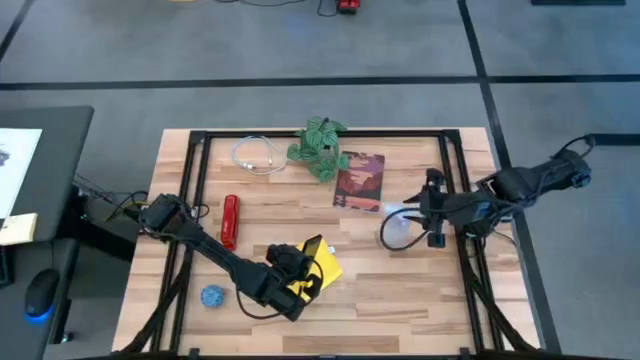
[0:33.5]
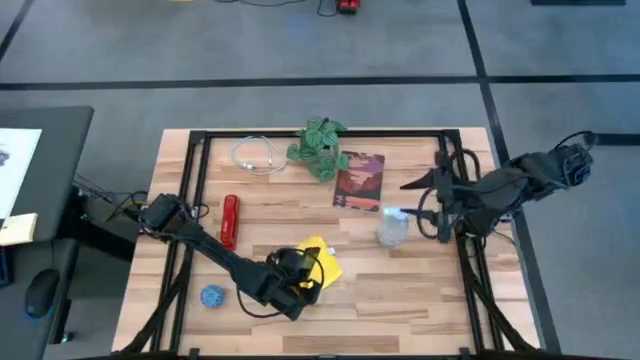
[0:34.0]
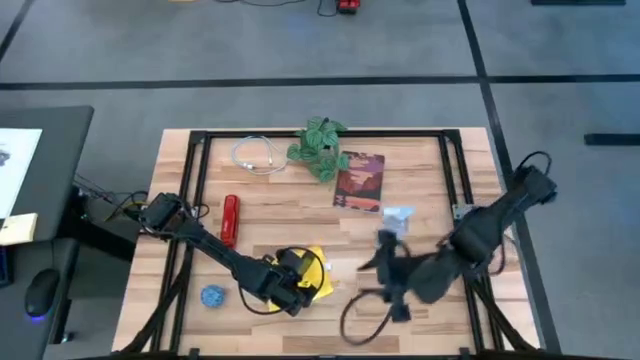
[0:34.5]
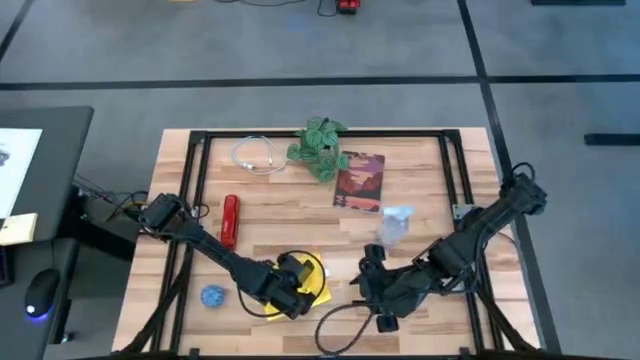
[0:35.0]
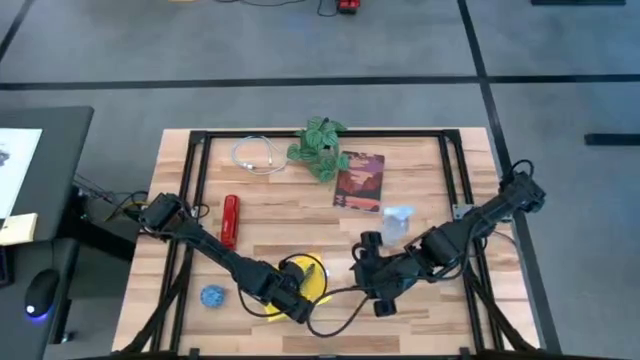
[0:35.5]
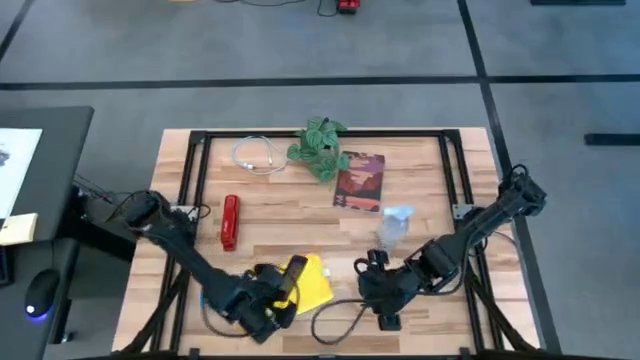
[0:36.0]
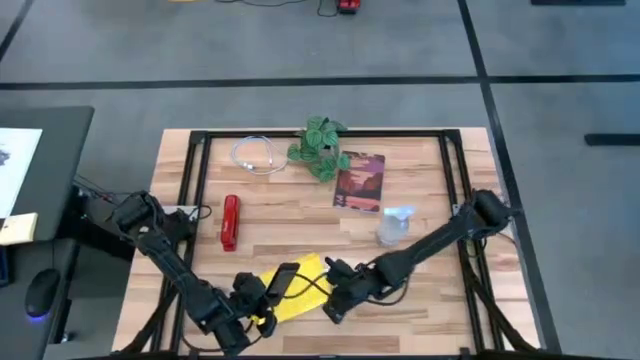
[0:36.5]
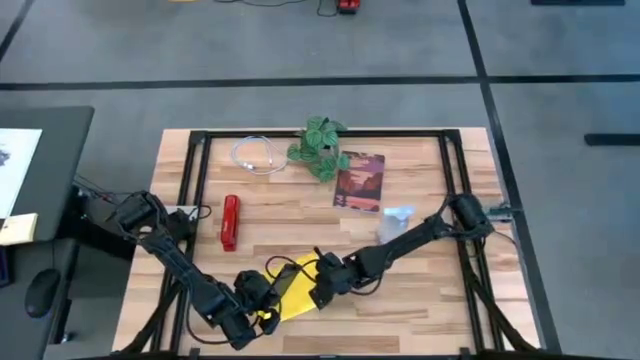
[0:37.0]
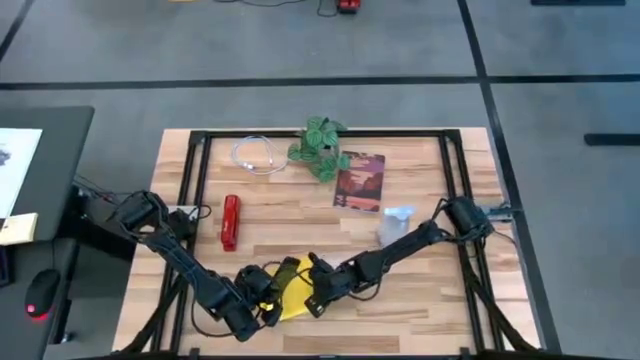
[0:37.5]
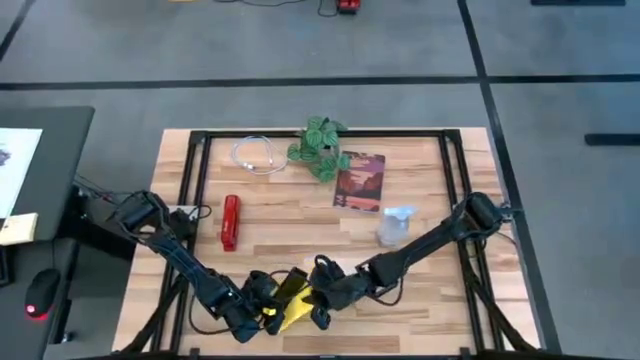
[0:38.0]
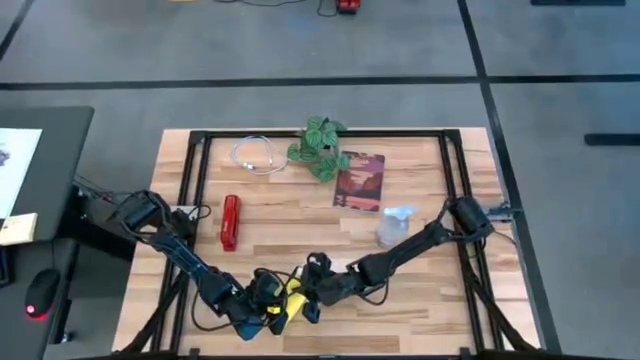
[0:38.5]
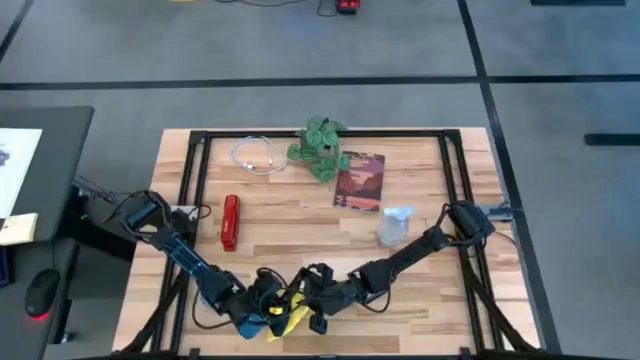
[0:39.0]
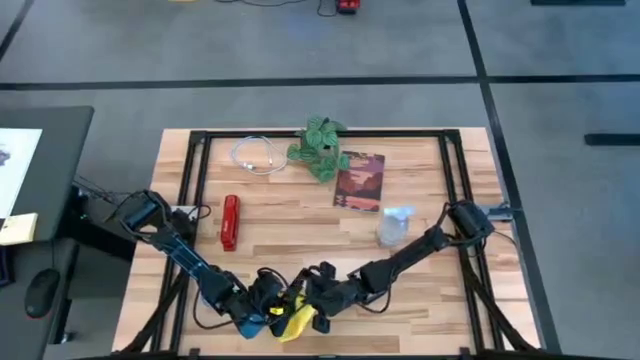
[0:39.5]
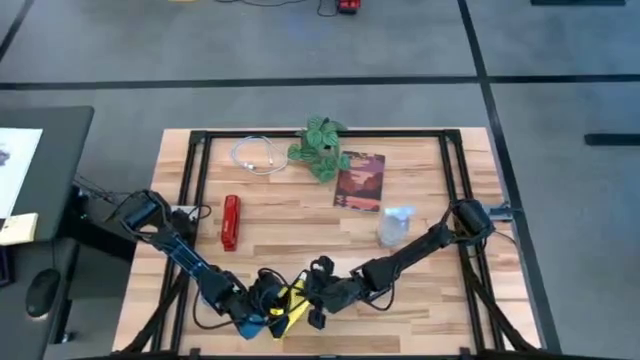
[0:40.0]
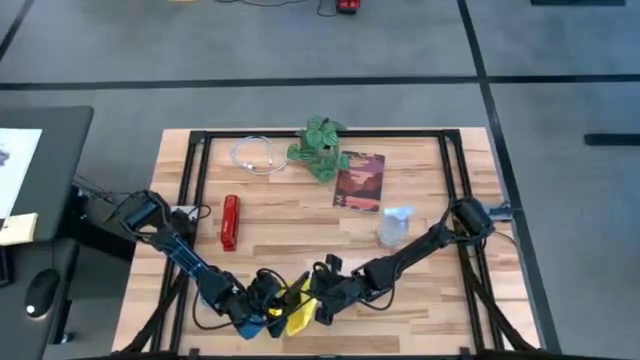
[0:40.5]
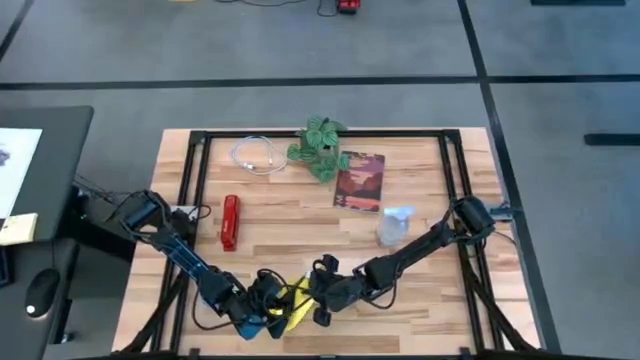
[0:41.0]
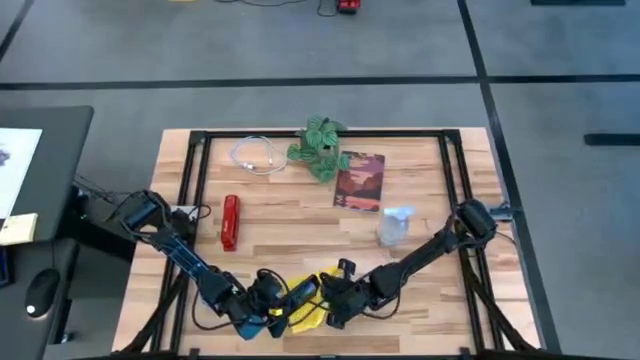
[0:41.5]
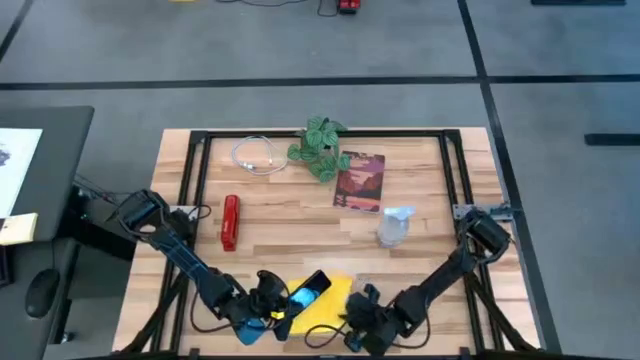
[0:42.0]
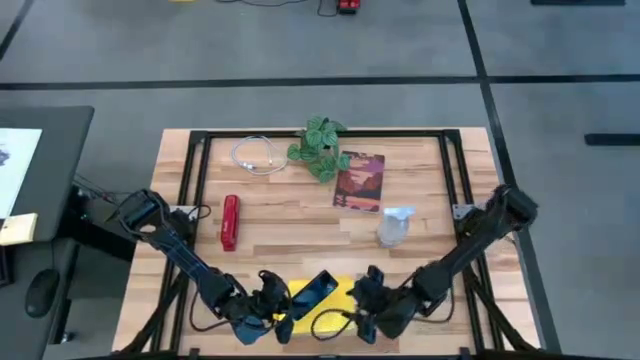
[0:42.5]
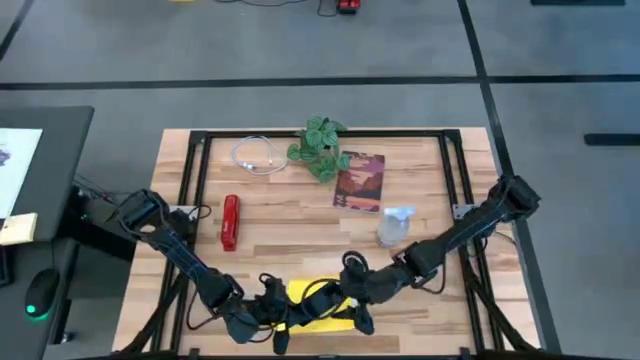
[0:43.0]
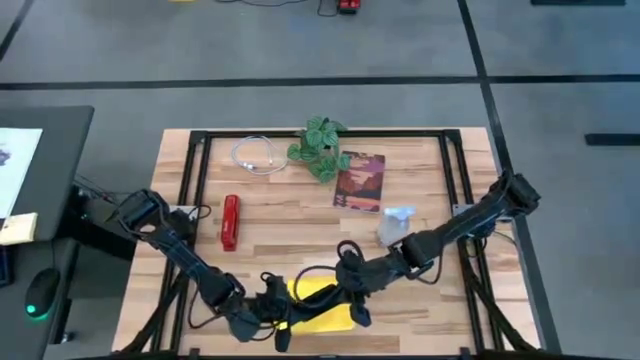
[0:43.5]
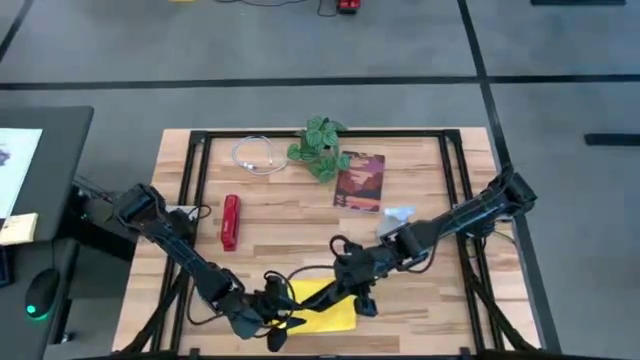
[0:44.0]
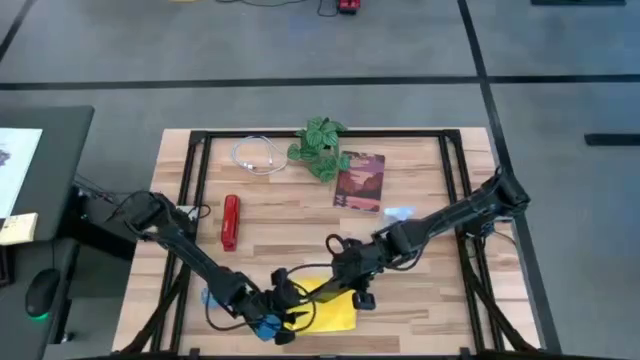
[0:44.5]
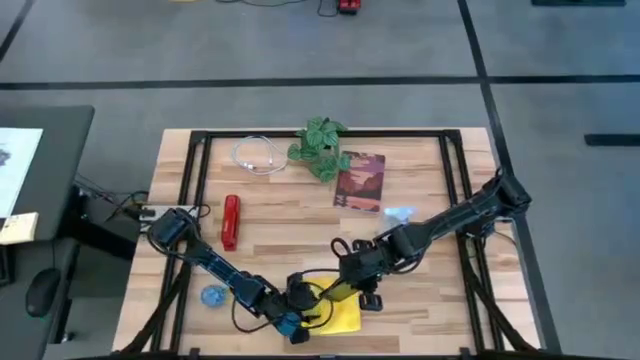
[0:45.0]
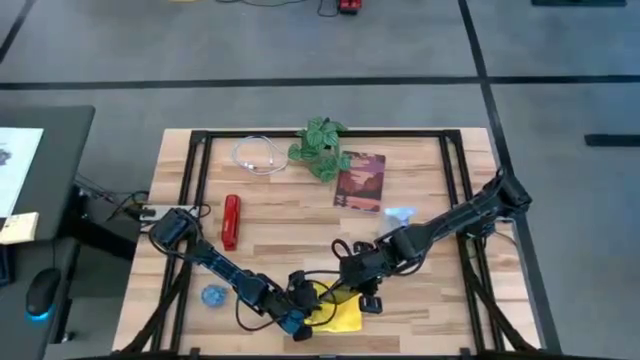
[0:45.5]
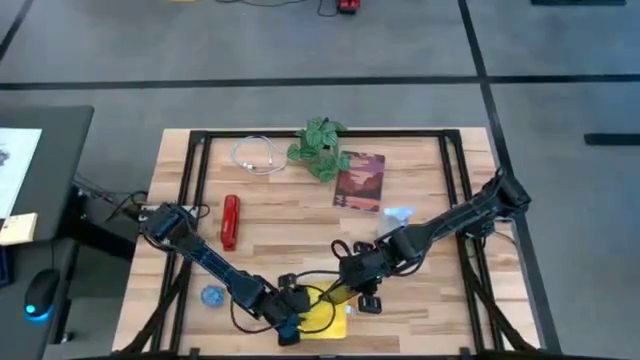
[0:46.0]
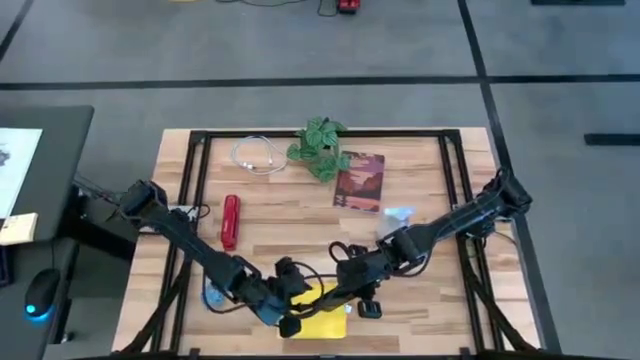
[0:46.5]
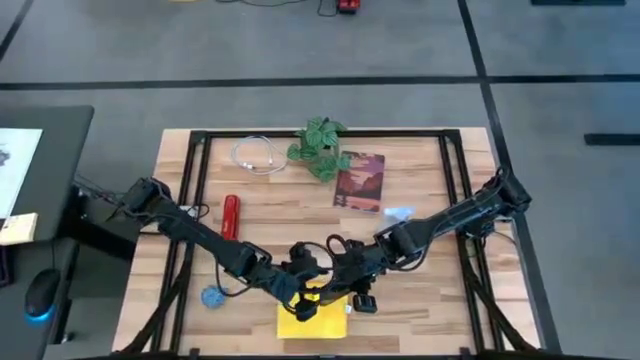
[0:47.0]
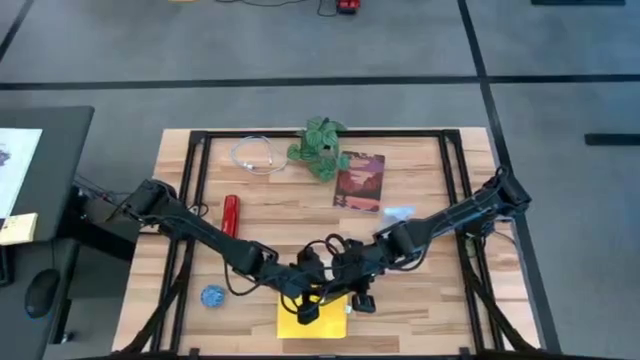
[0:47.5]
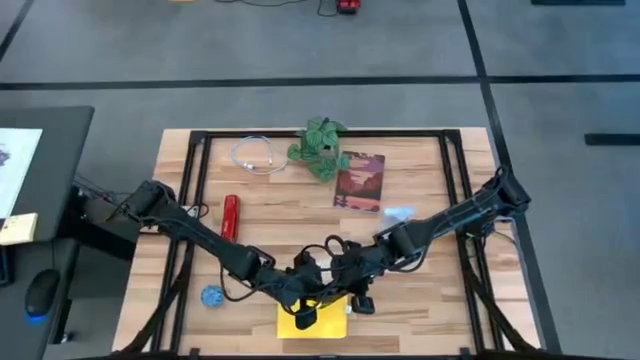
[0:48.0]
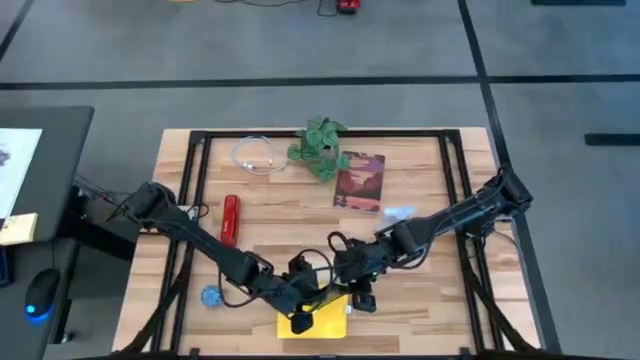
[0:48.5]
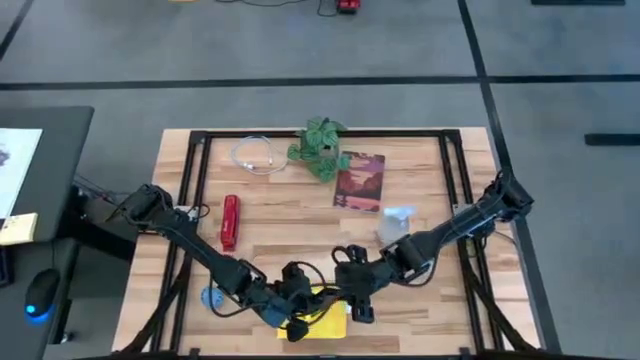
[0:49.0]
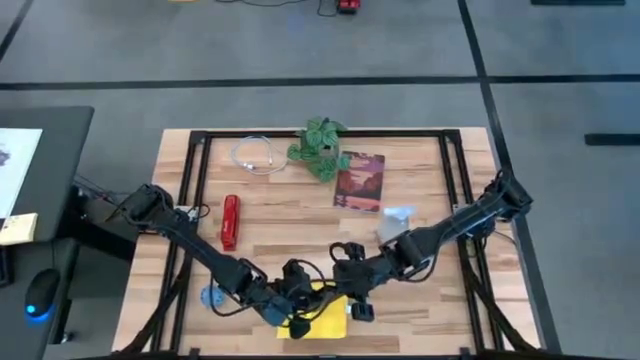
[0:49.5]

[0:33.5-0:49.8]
Task: Apply microfiber cloth
Wipe the front of the cellphone using the microfiber cloth

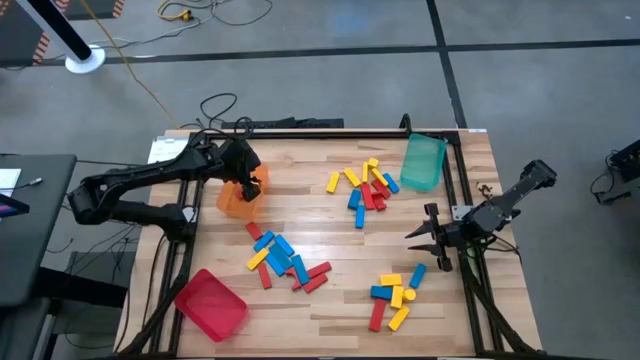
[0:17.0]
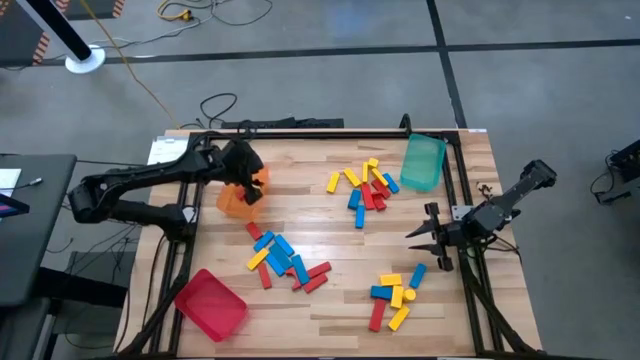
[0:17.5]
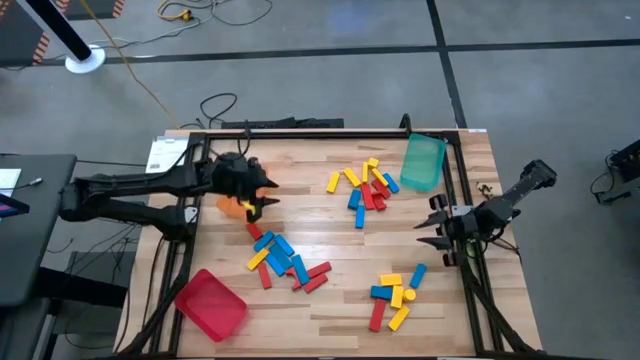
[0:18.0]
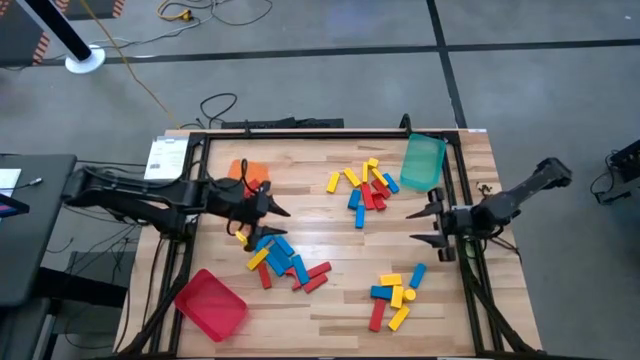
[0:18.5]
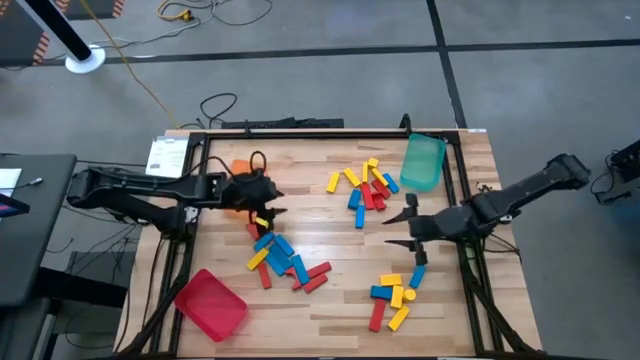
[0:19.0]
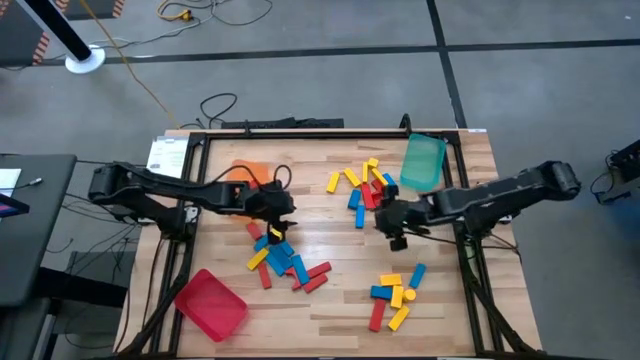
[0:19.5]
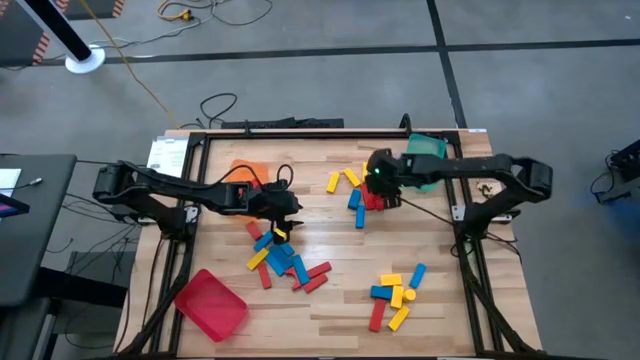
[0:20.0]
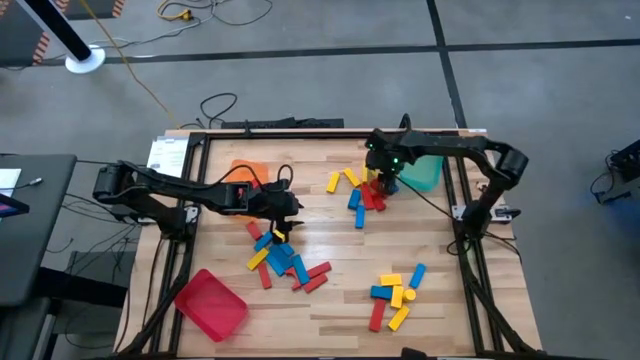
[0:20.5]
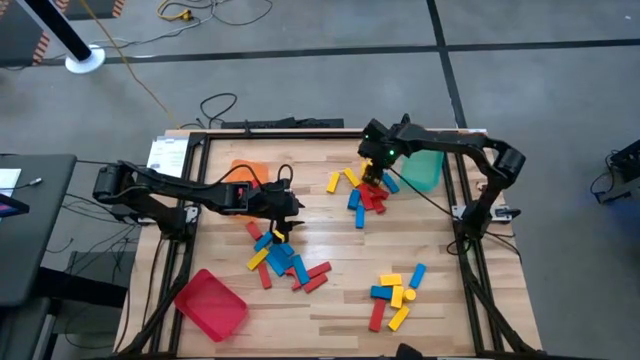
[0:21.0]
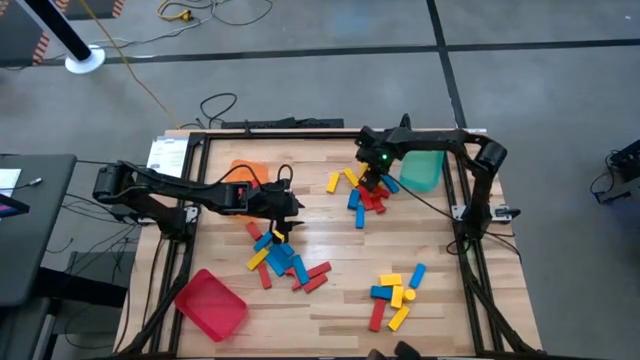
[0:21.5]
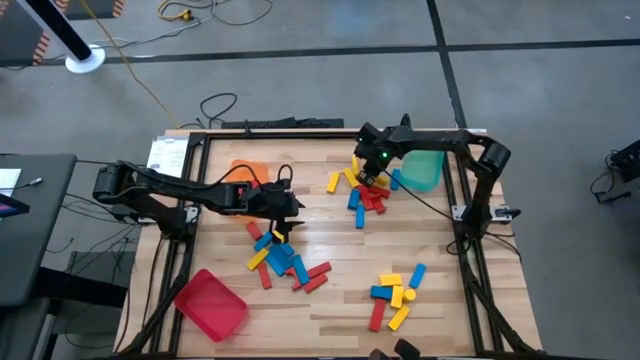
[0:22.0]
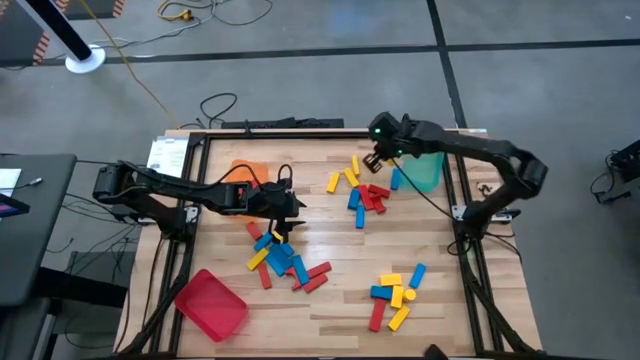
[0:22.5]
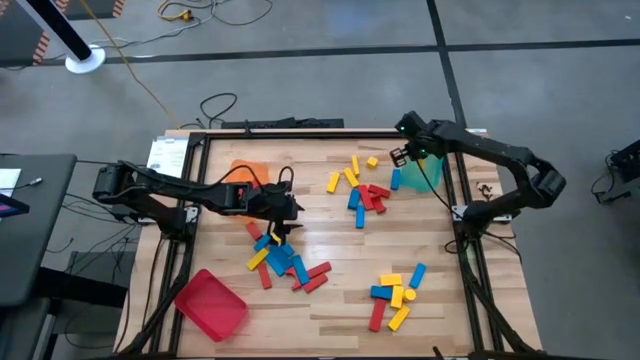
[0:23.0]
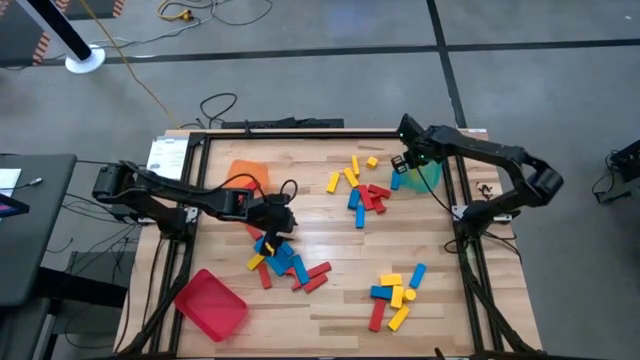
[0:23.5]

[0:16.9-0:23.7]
Task: Sort blocks
Put the yellow wooden block into the green bin
